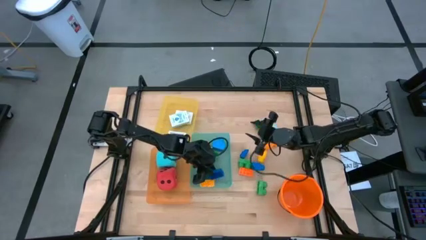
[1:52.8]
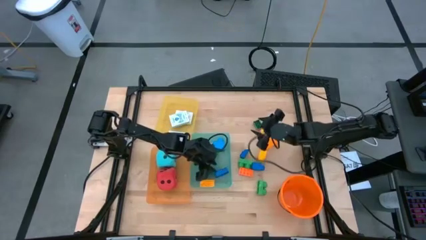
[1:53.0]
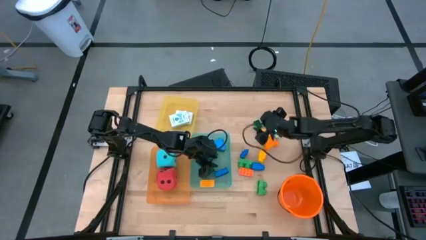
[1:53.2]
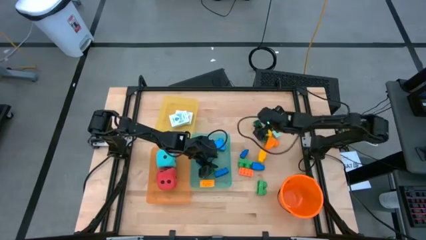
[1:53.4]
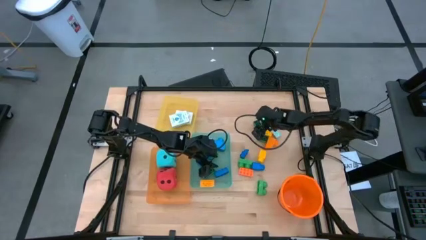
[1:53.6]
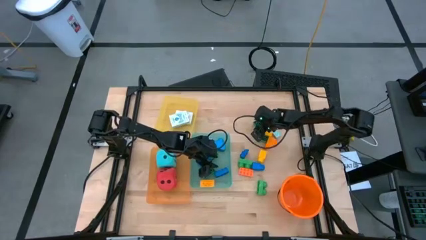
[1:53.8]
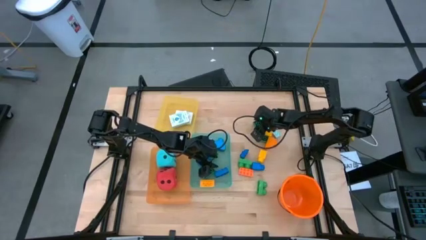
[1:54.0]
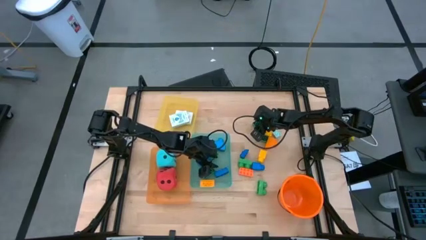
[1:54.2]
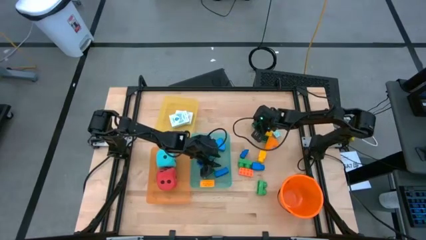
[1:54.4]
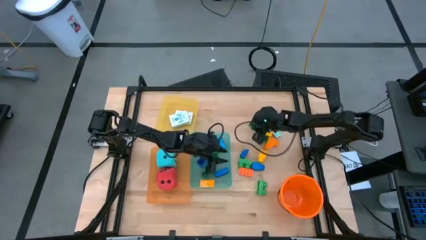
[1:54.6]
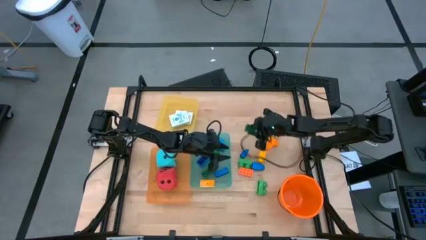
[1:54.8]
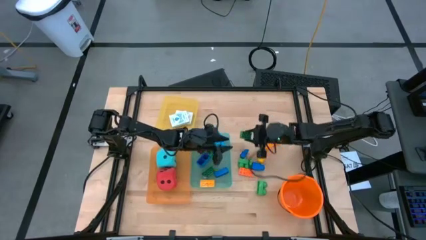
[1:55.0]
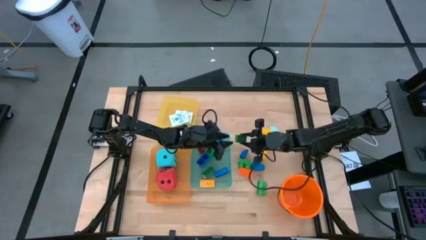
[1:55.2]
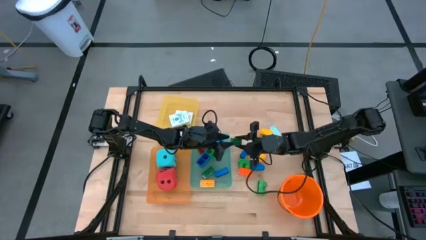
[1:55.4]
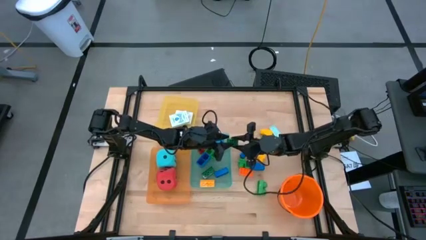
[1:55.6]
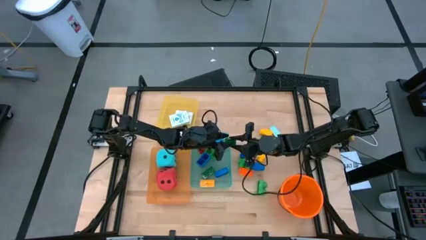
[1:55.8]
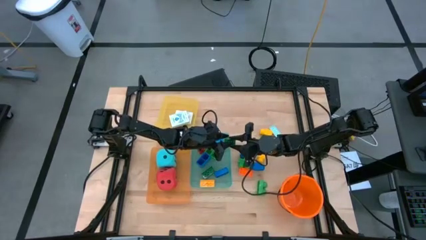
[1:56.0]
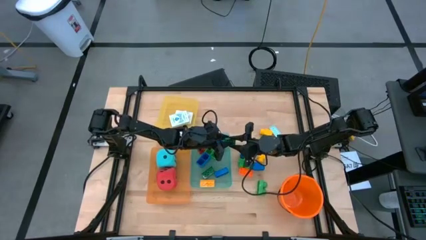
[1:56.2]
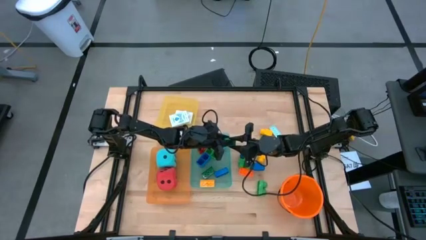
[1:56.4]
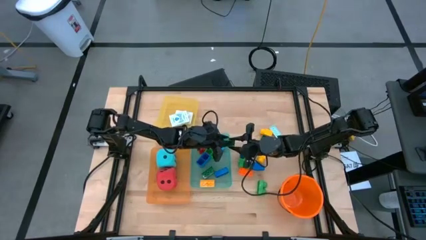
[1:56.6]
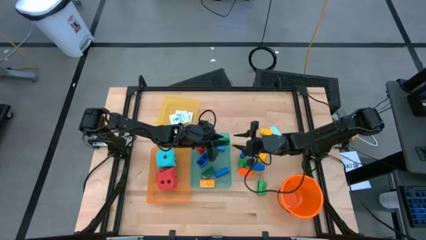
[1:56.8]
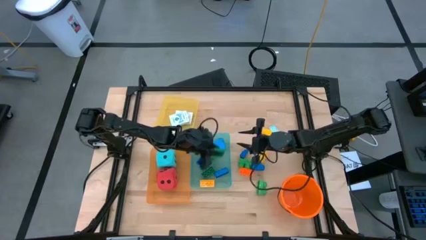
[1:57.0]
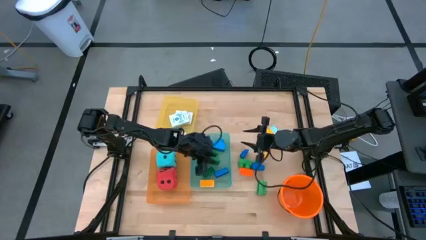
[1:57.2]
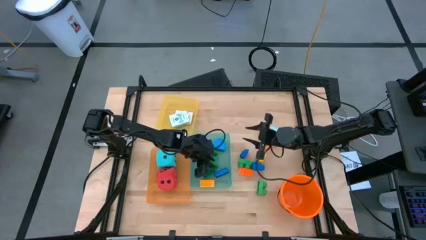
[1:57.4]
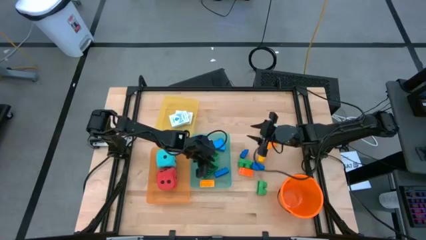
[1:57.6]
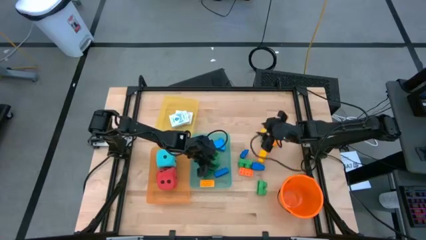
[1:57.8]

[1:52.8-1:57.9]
Task: Pick & Place Toys
Put the green game piece into the green bin

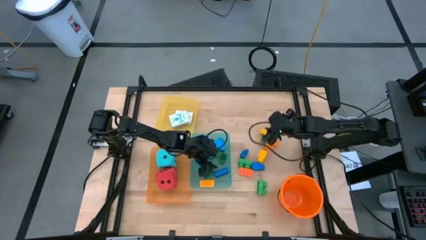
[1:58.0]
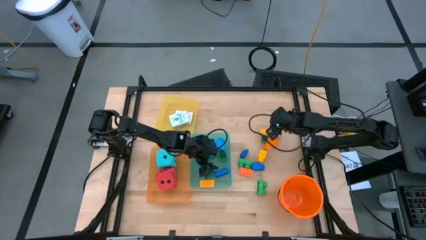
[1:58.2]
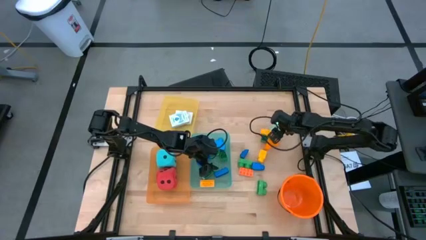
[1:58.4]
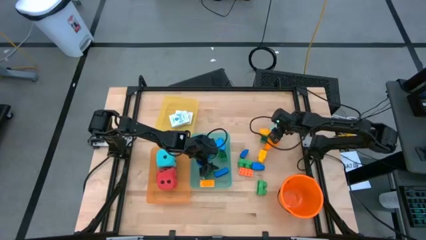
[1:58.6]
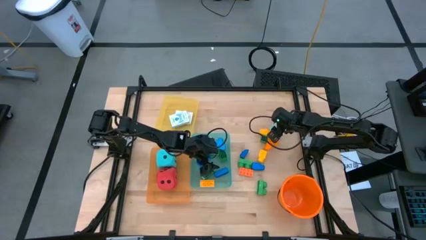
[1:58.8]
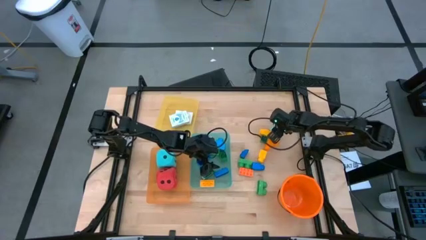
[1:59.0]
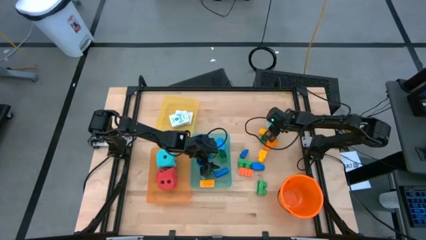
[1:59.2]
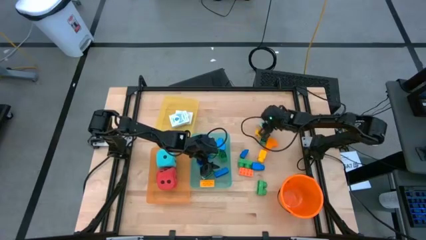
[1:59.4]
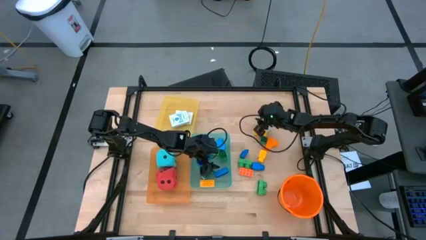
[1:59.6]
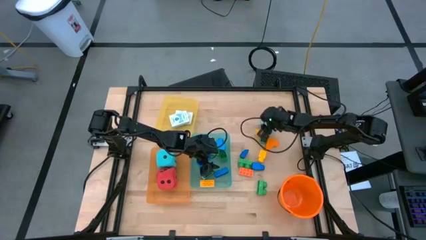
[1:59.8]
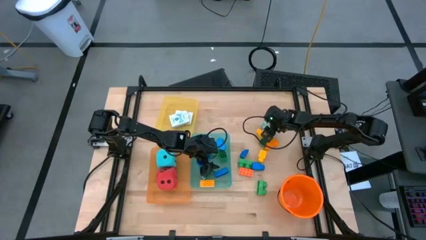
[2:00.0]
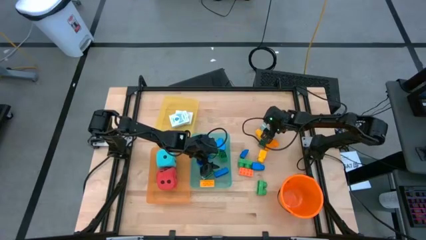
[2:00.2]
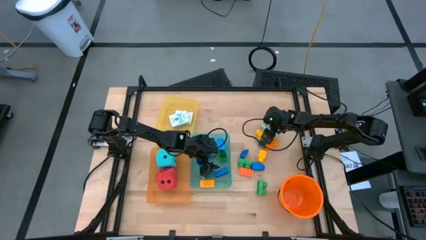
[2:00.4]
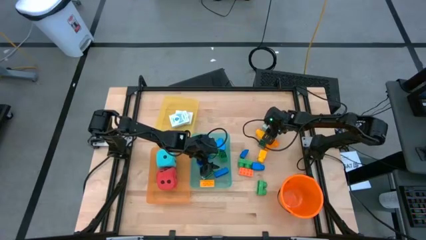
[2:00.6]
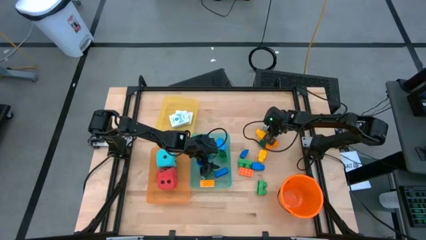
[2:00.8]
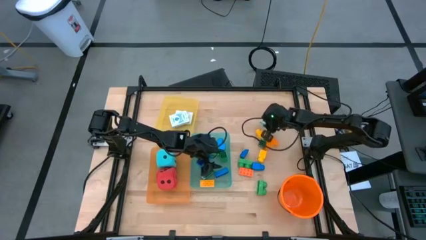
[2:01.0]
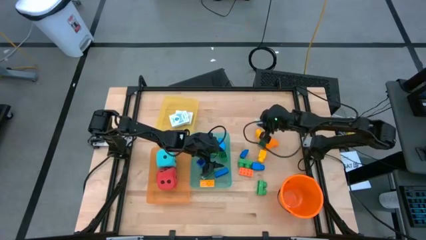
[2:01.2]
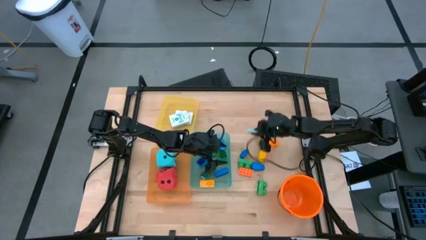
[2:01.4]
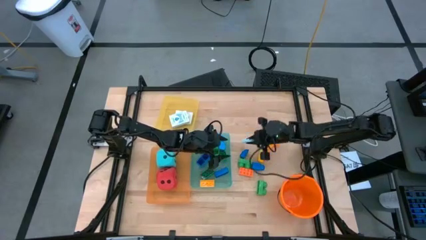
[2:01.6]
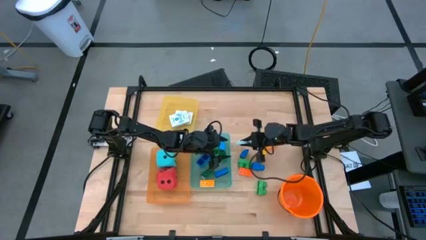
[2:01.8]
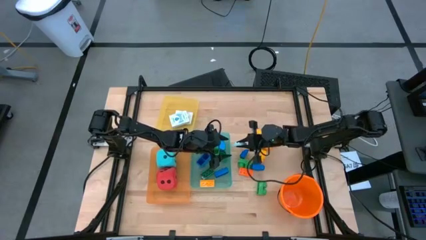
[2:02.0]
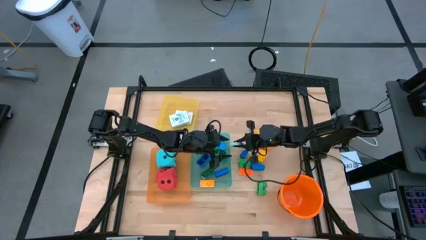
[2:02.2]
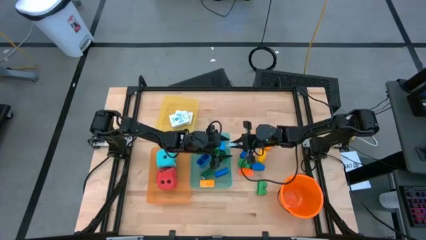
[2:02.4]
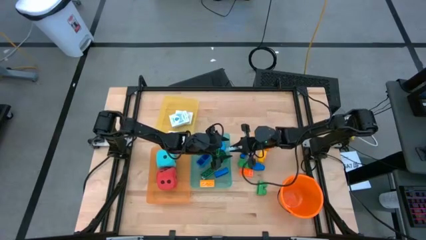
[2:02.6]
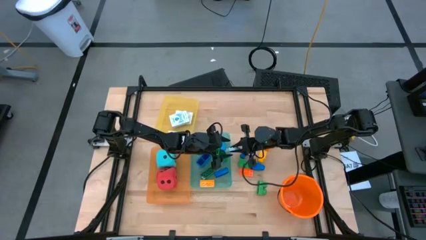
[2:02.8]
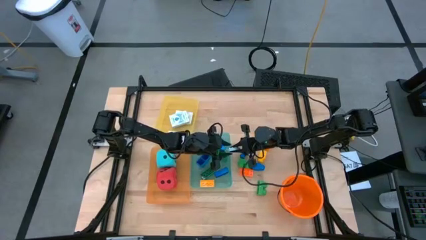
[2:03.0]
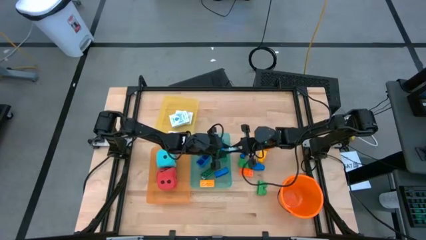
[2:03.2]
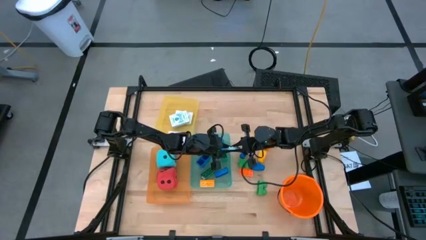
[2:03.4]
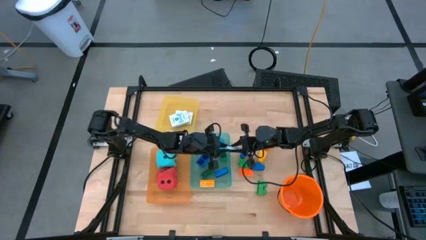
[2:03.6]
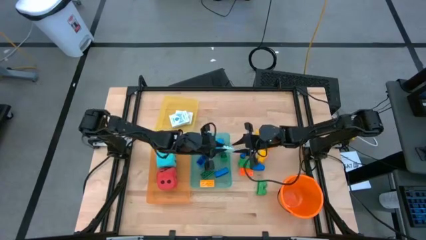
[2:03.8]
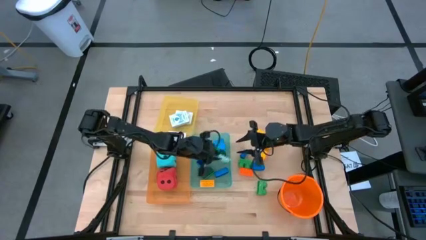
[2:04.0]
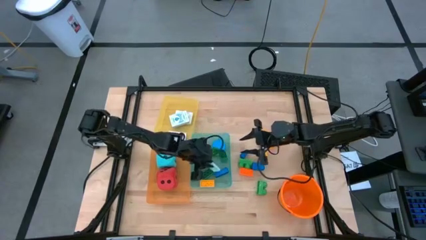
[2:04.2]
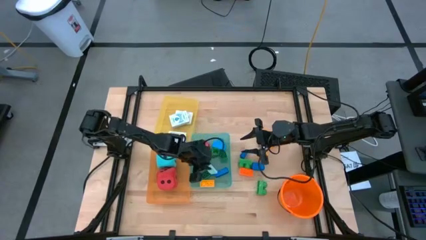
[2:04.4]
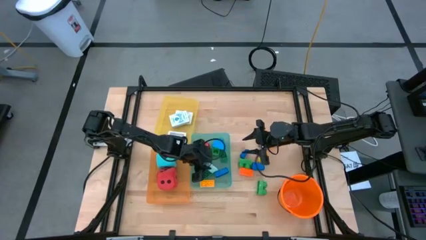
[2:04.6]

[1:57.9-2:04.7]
Put the light blue game piece into the green bin

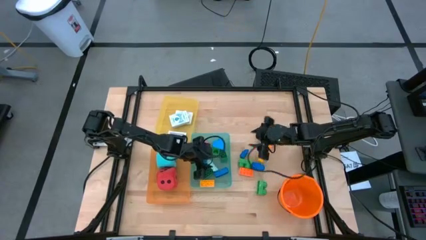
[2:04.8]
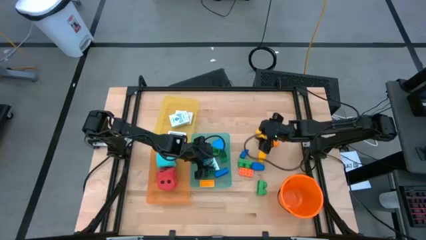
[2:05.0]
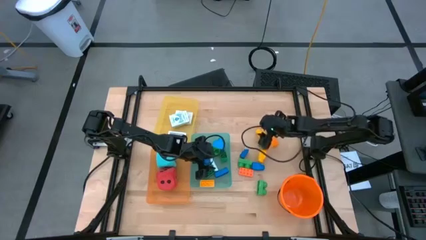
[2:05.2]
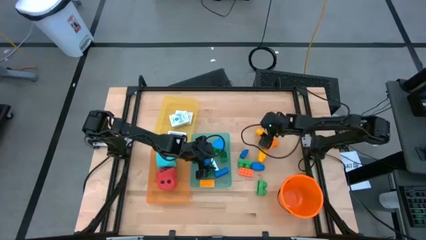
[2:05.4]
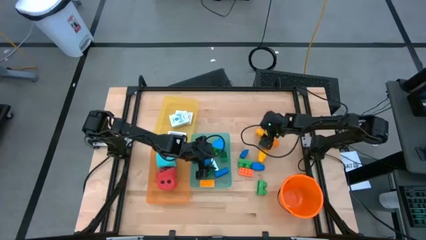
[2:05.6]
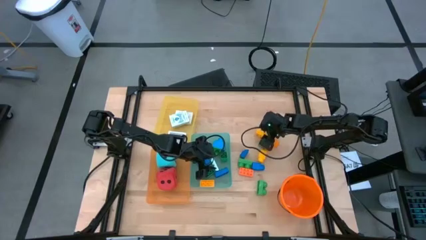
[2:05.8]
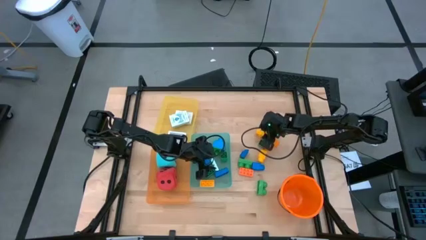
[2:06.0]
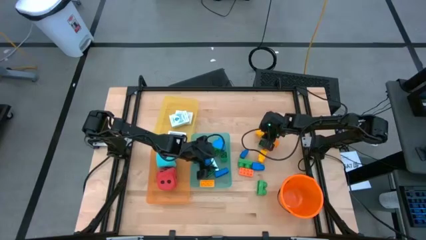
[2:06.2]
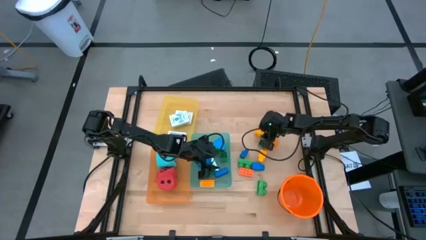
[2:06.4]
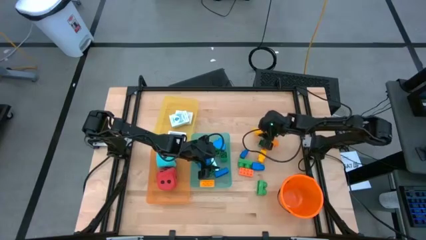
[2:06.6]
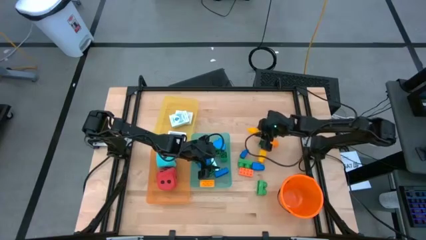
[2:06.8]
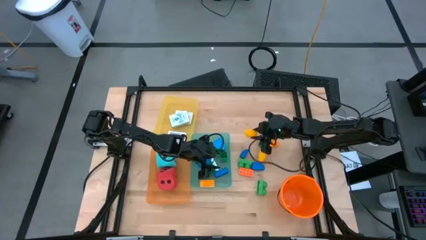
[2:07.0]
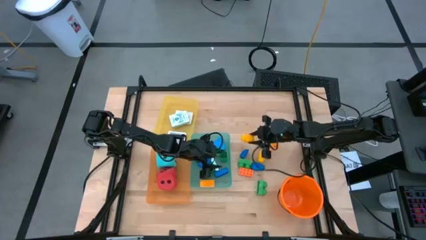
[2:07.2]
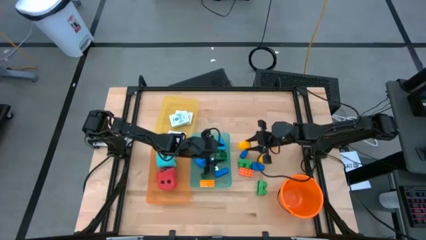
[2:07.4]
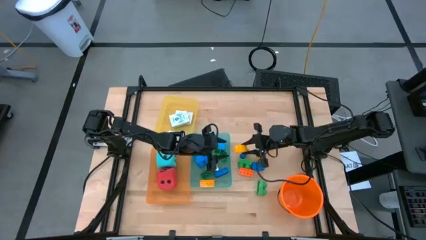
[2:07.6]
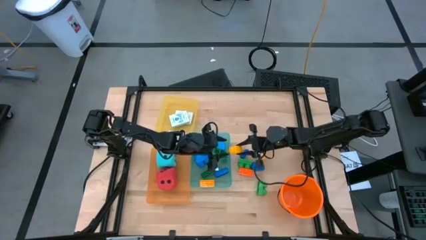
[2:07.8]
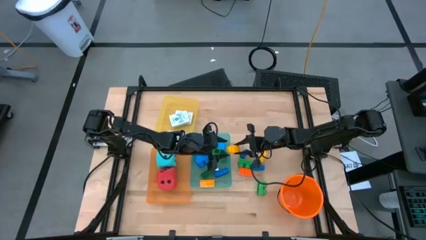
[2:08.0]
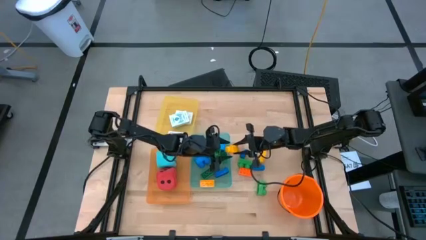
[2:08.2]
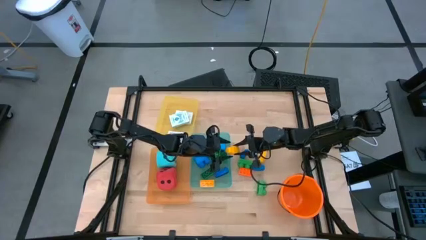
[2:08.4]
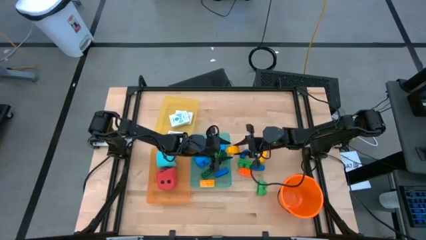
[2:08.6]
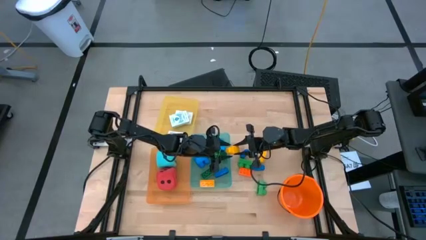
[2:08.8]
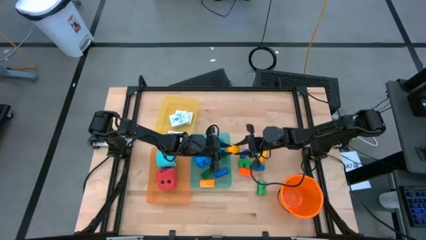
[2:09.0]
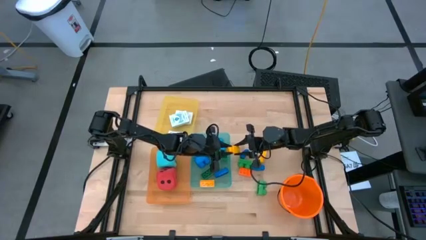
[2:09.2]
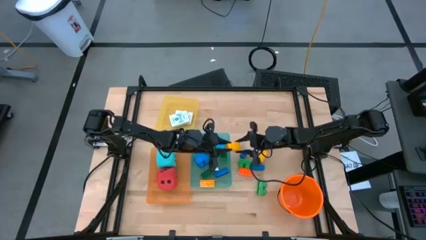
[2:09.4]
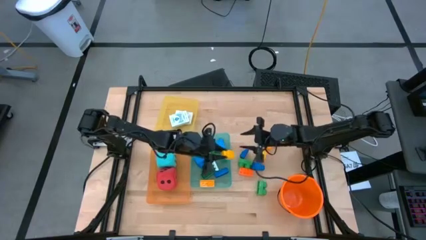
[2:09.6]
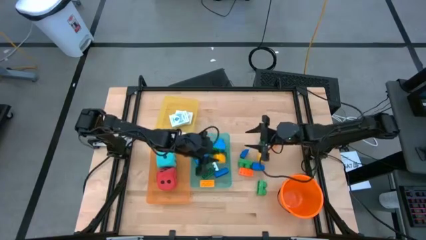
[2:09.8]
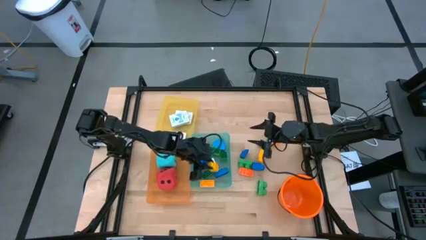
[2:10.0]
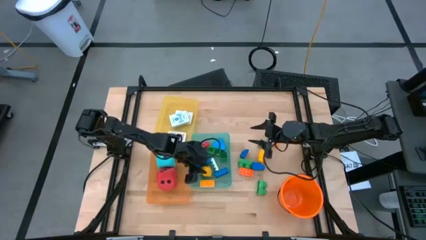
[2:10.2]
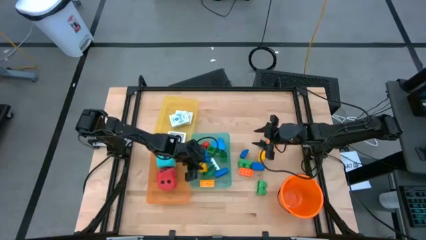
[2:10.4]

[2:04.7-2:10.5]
Put the yellow game piece into the green bin
